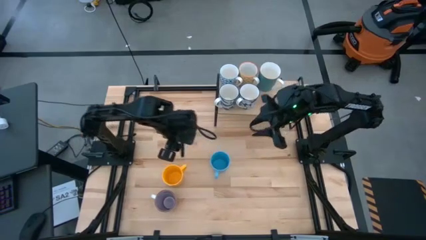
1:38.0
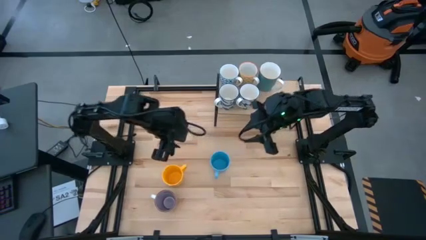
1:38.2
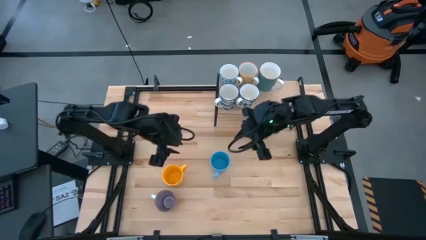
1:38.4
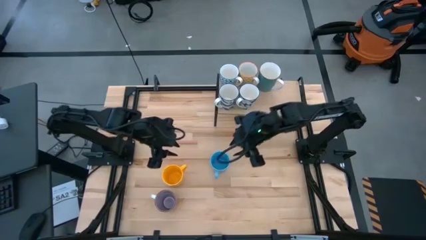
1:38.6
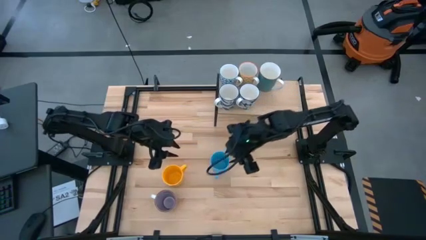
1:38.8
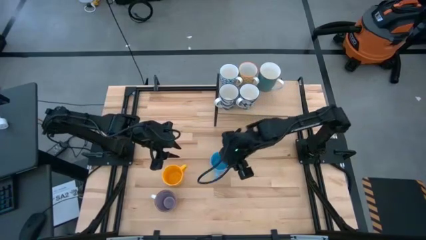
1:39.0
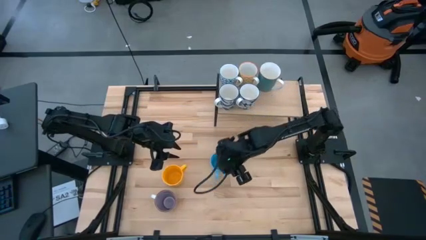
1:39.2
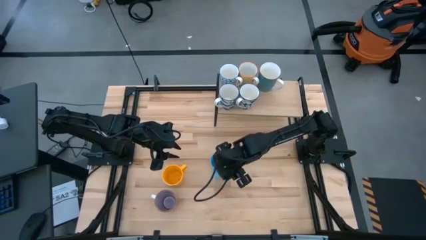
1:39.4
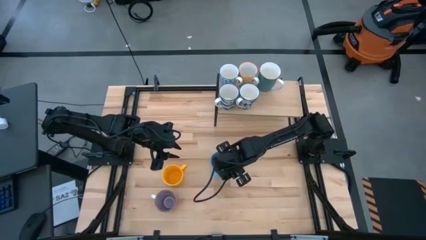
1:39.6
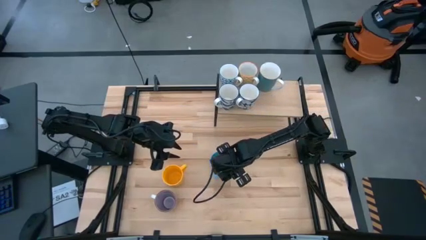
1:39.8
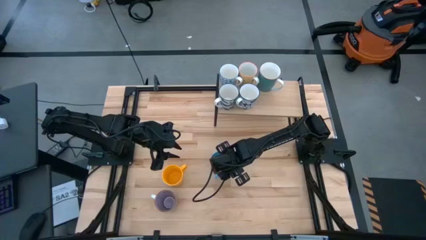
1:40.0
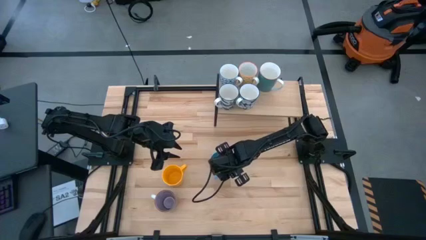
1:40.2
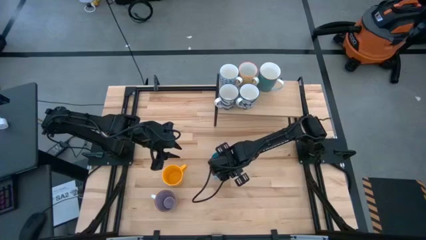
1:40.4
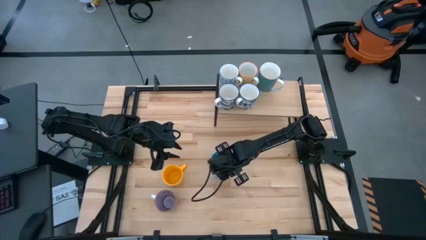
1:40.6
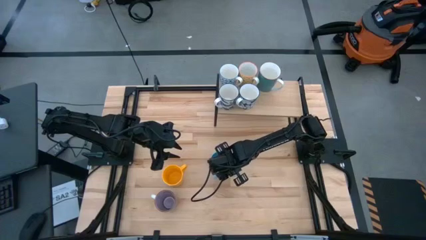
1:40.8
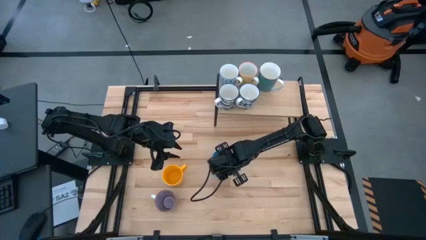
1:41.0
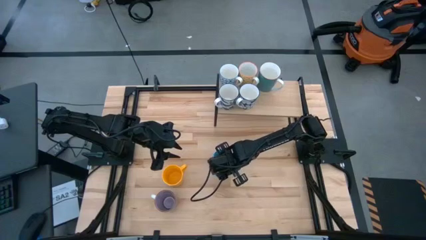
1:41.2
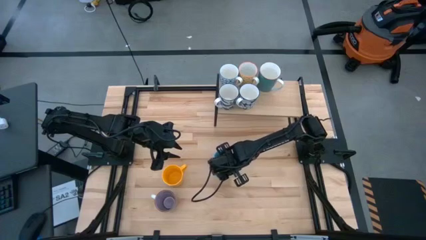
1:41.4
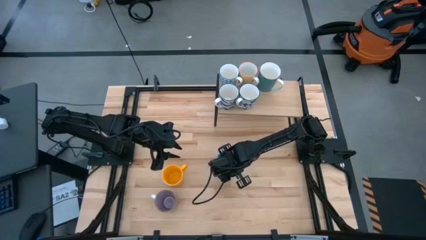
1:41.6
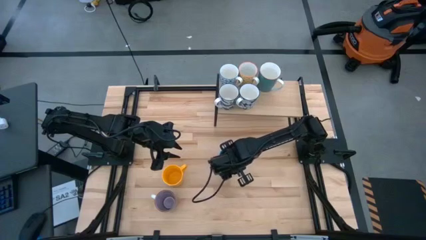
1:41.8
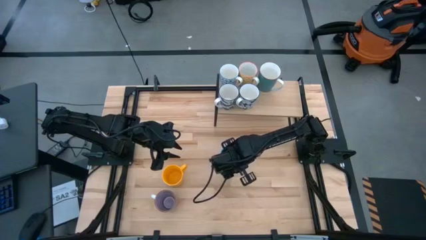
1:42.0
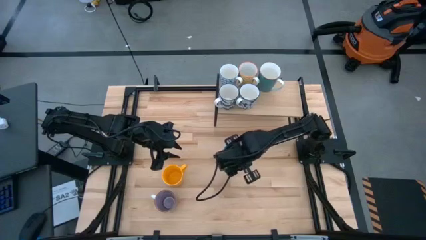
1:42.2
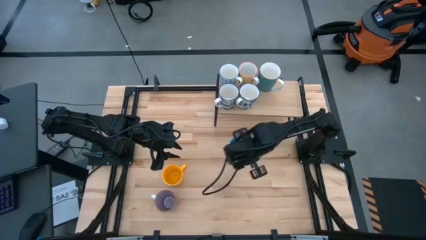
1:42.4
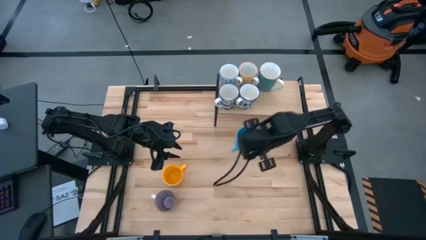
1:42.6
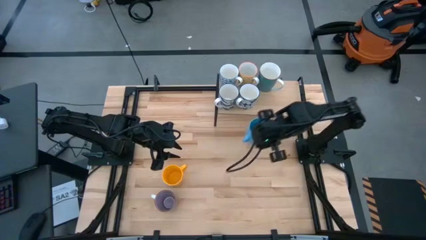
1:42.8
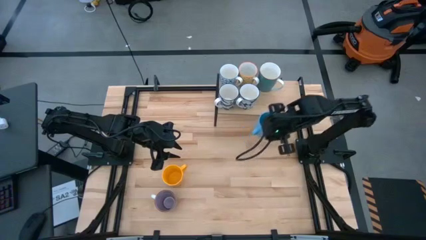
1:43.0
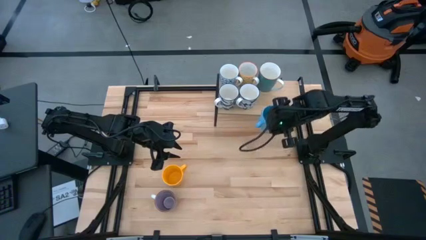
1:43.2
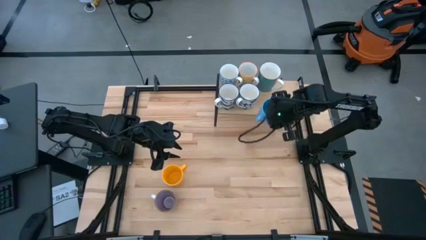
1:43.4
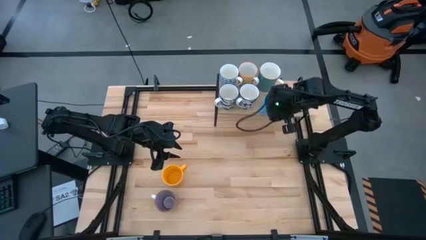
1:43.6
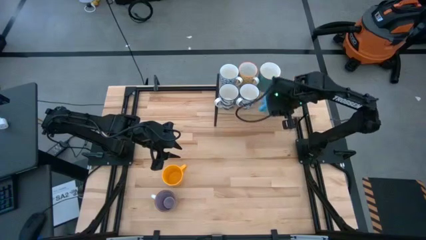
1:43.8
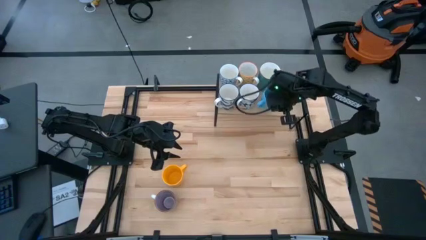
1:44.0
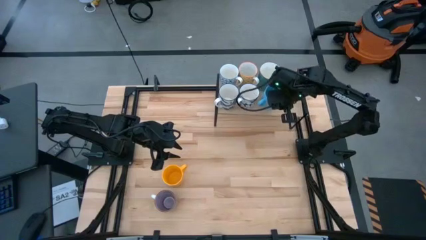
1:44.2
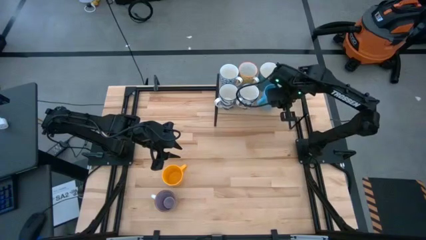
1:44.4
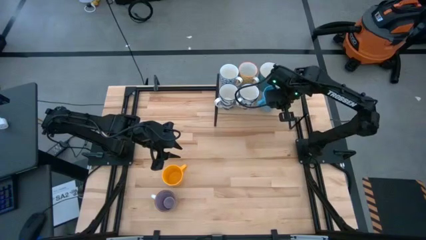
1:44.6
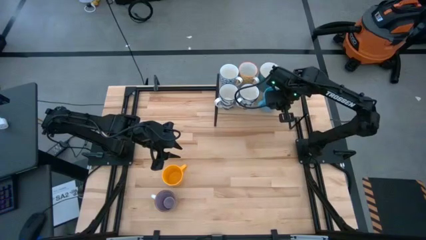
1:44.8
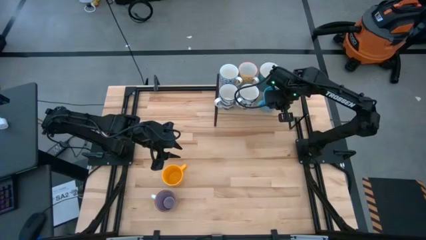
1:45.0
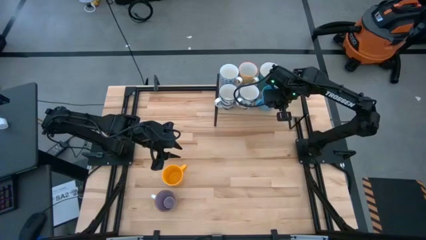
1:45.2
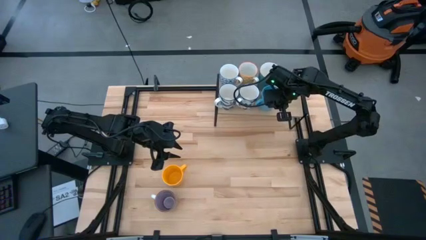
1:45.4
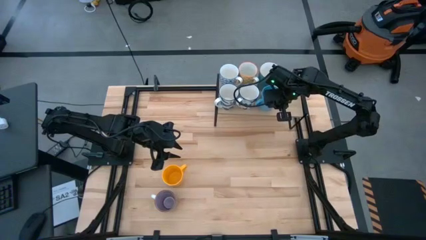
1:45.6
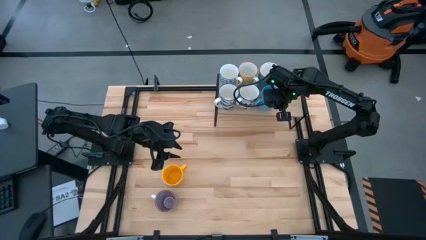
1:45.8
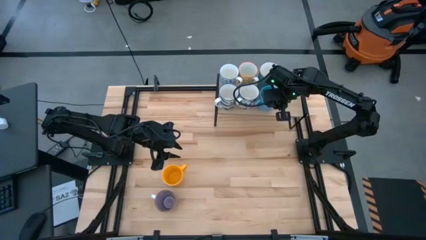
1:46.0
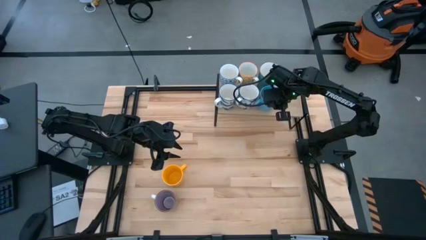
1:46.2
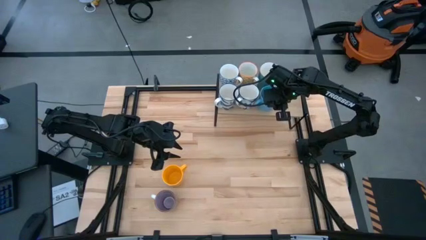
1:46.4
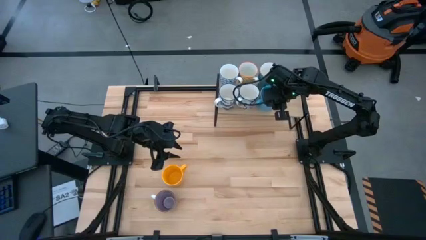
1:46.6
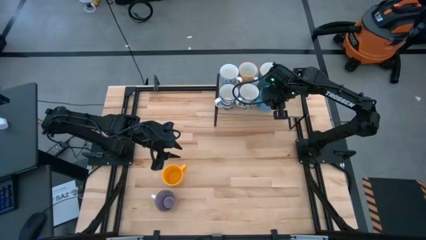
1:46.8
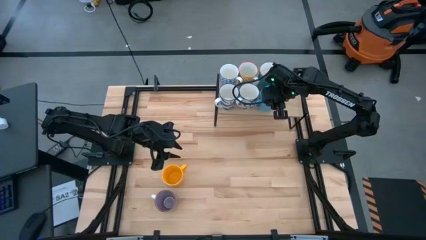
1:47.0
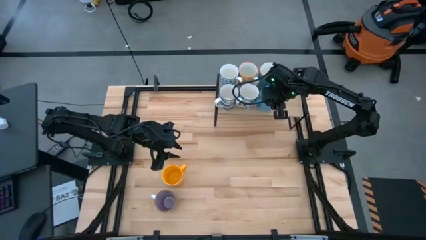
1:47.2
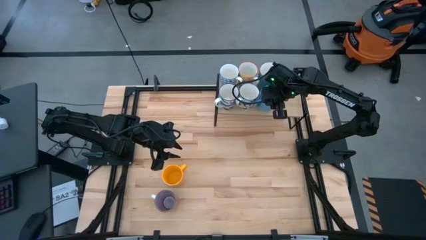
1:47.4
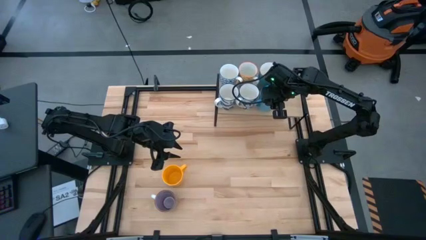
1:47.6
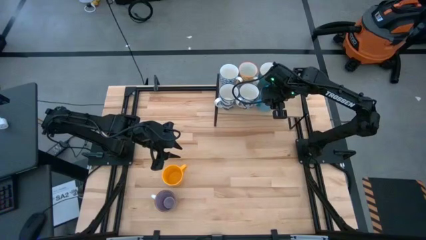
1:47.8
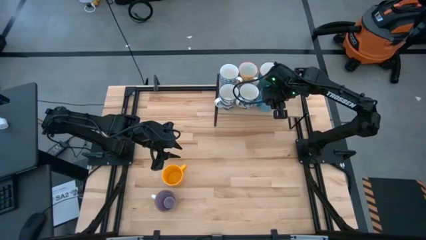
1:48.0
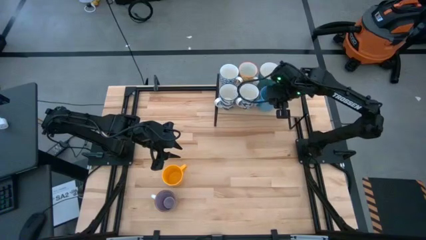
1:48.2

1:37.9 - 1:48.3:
Task: Place coffee mugs
Put the light blue mug on the shelf

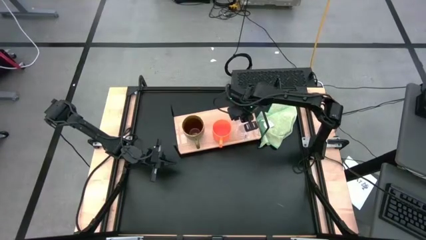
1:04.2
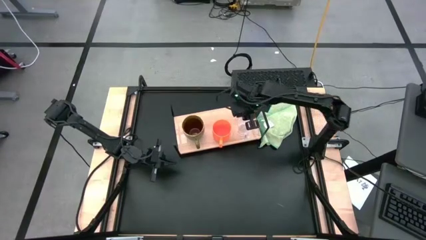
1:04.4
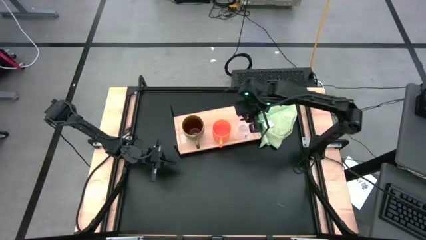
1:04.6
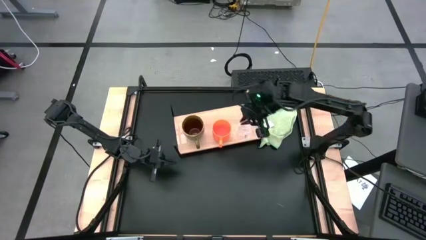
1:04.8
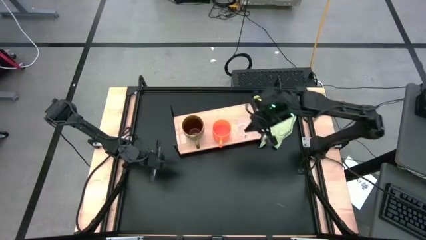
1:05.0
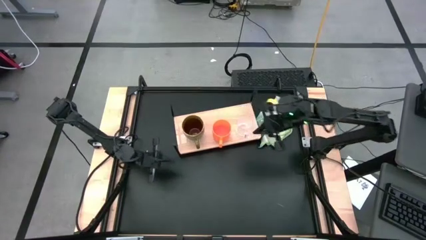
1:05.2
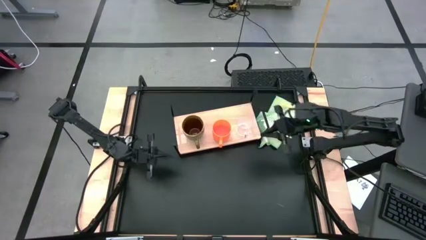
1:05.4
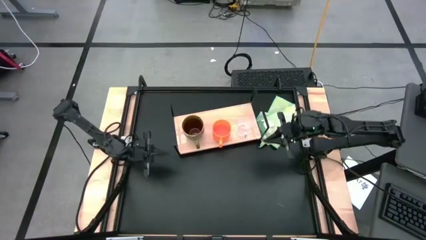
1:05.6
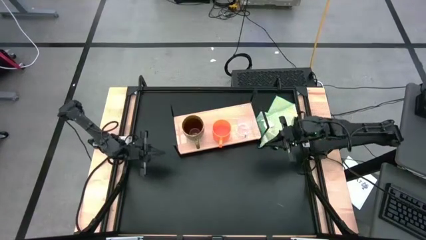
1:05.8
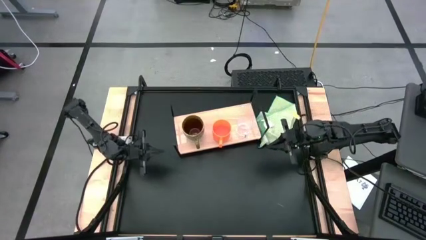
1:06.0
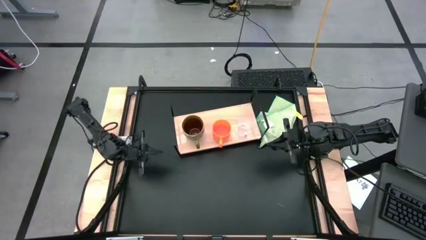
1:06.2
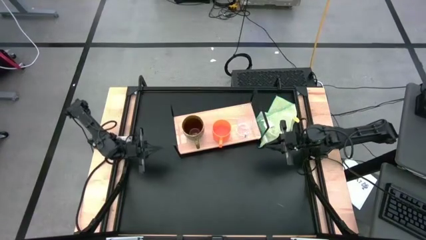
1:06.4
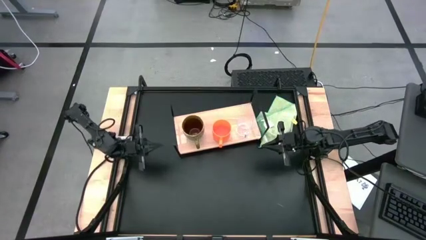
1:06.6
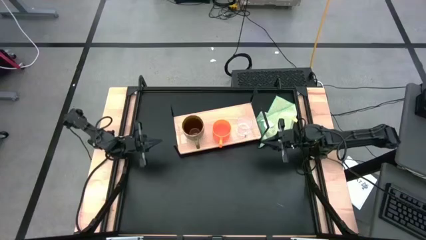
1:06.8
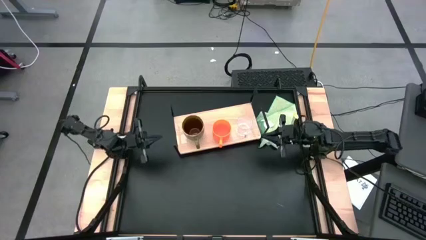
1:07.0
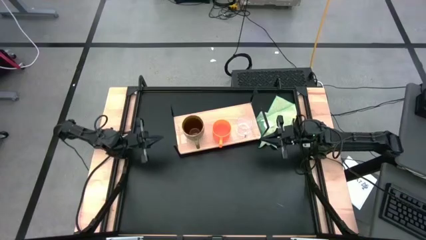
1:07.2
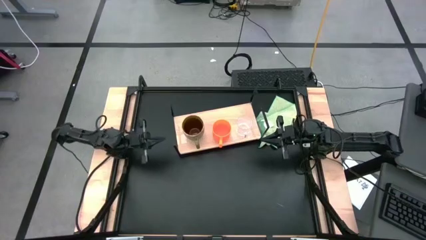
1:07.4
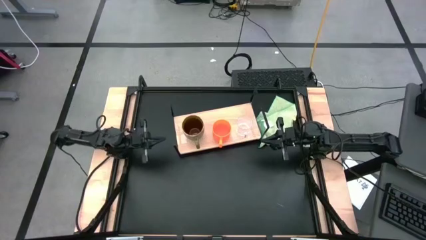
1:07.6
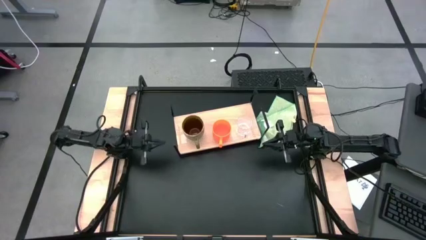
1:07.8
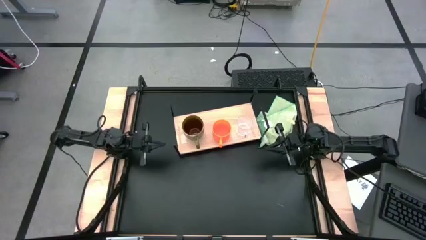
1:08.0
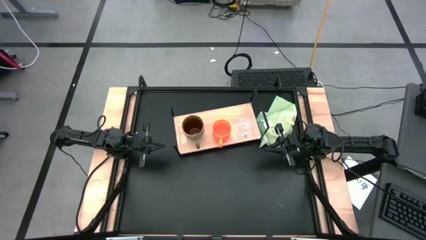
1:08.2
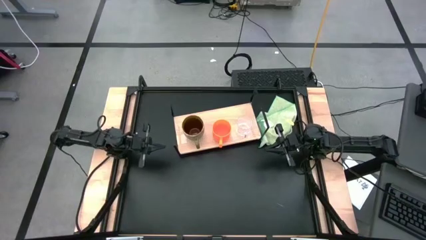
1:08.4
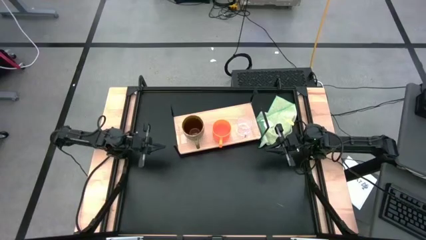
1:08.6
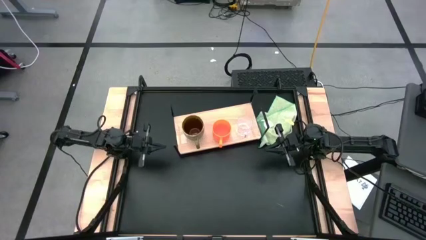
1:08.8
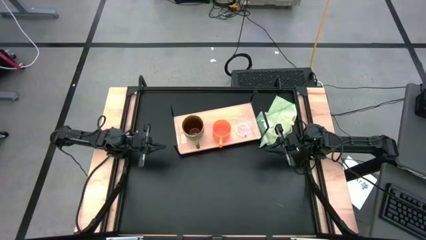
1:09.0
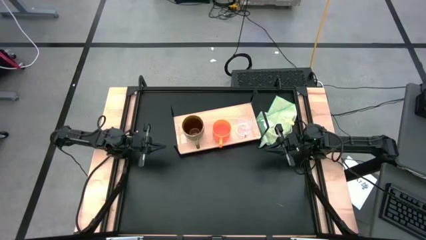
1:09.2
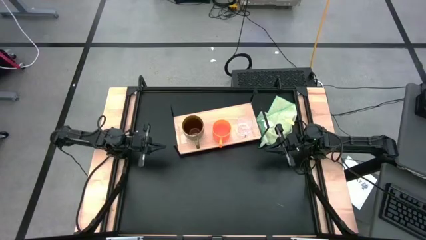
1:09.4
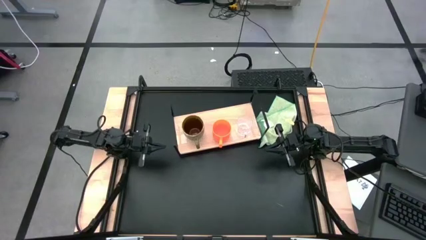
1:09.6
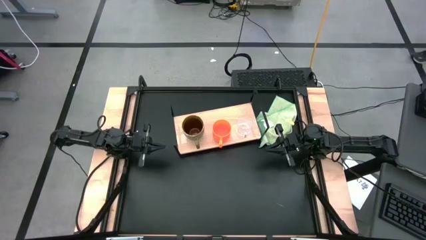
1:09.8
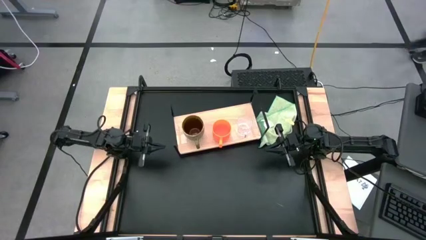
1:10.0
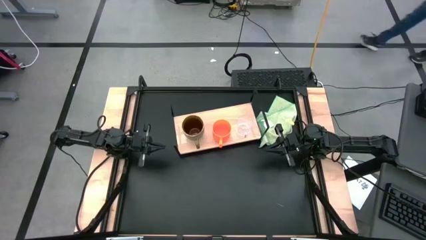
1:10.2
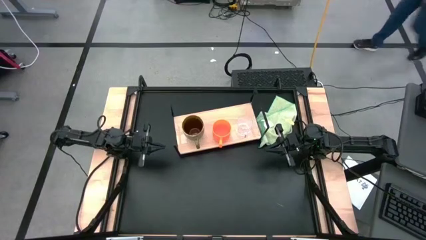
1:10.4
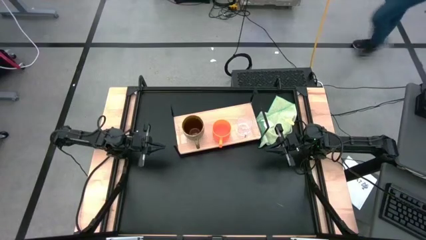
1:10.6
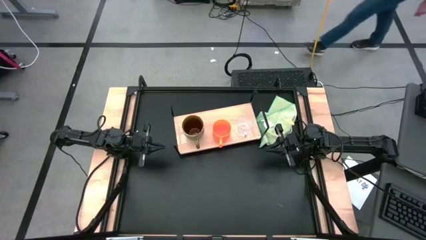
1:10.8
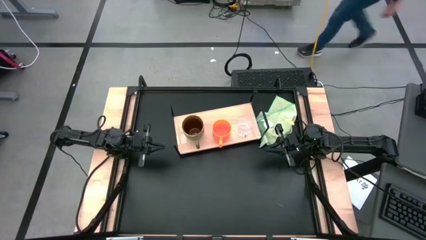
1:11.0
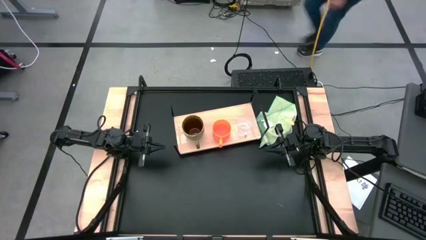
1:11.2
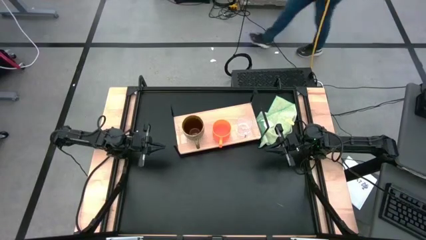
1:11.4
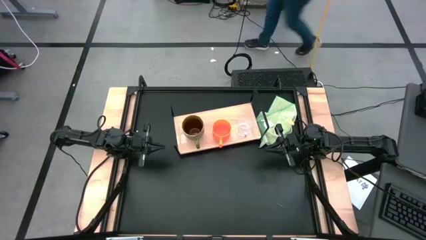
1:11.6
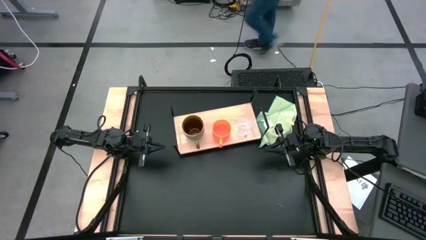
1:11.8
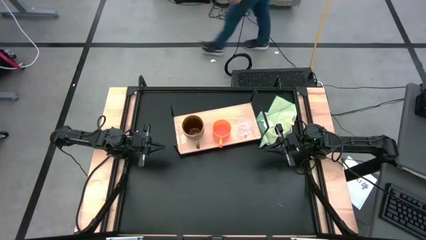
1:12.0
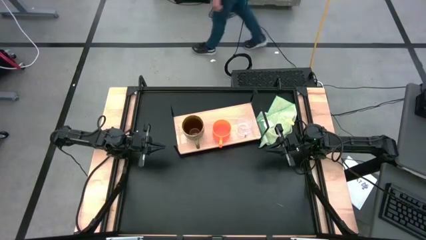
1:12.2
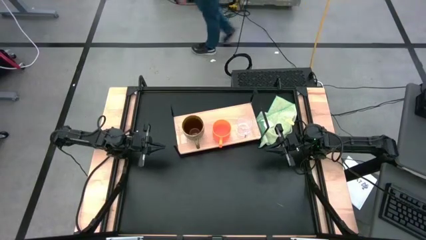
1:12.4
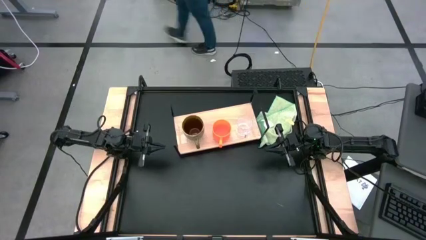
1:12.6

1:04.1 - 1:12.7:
Task: Stack small to large cups/mugs on shelf
Return to Home Position
